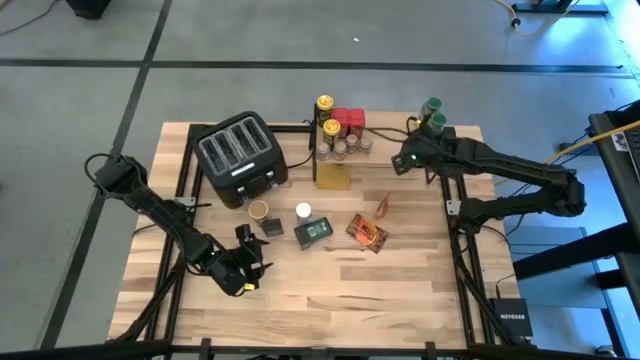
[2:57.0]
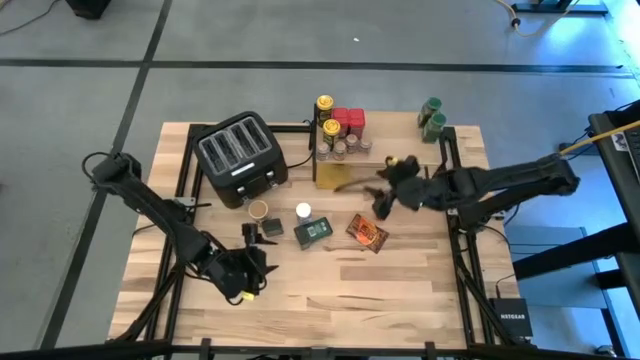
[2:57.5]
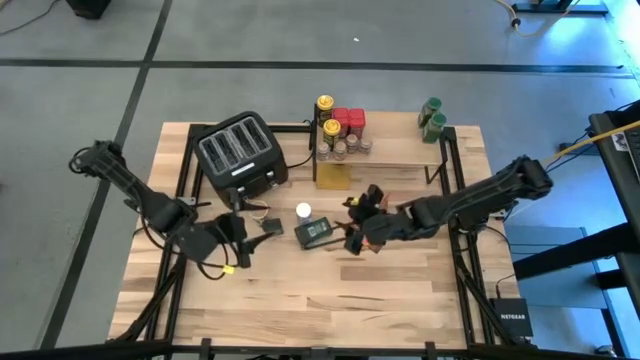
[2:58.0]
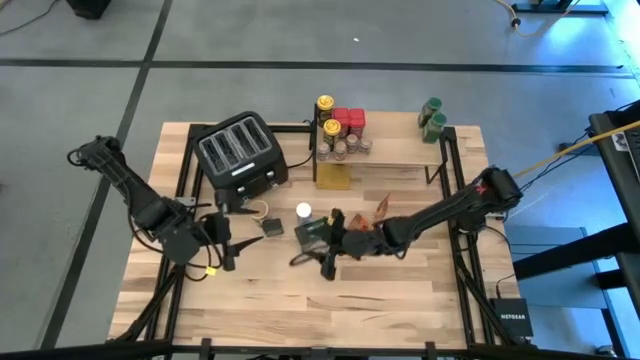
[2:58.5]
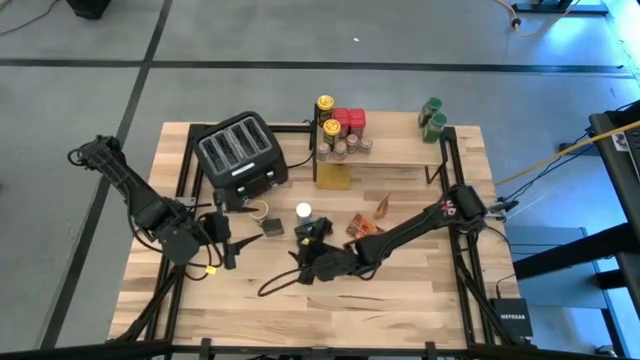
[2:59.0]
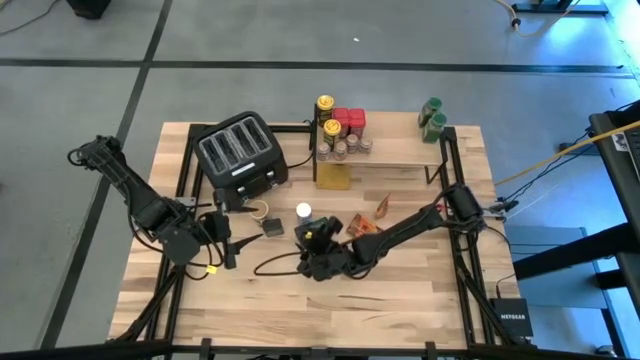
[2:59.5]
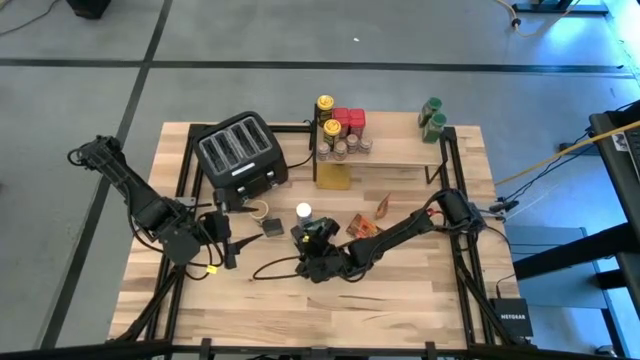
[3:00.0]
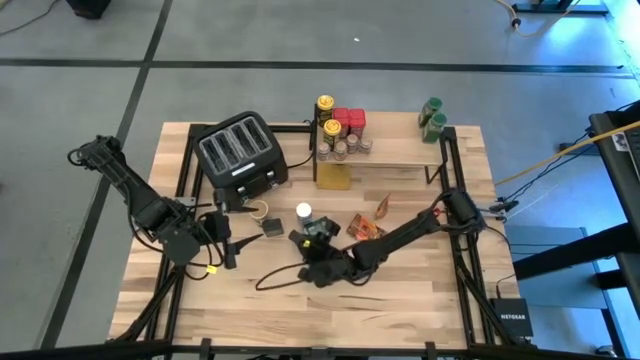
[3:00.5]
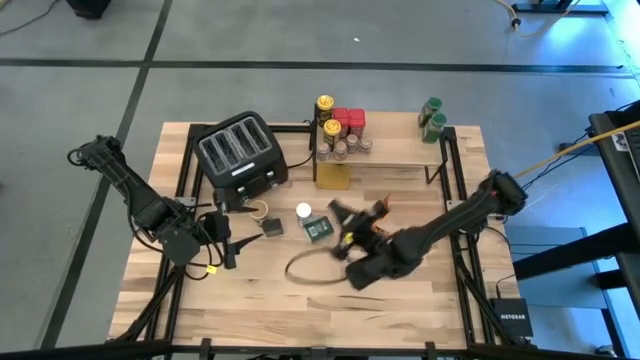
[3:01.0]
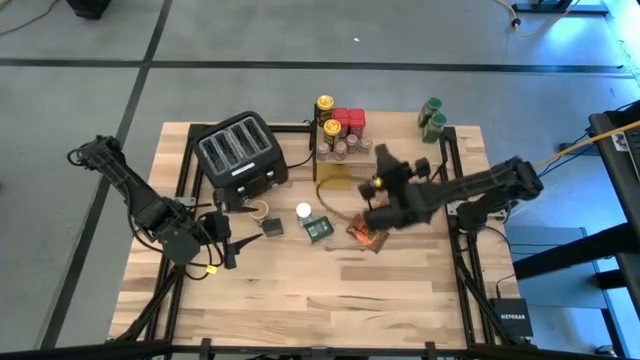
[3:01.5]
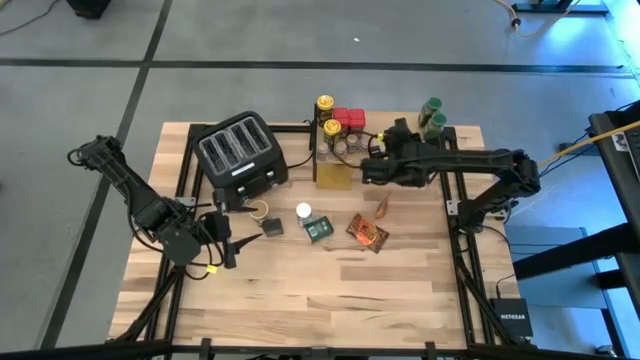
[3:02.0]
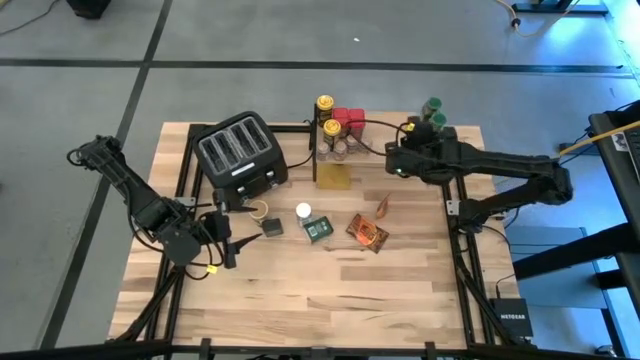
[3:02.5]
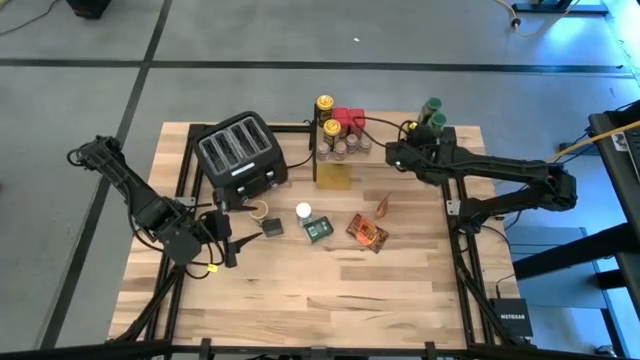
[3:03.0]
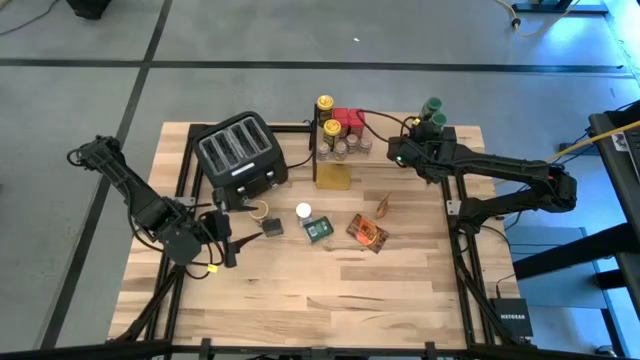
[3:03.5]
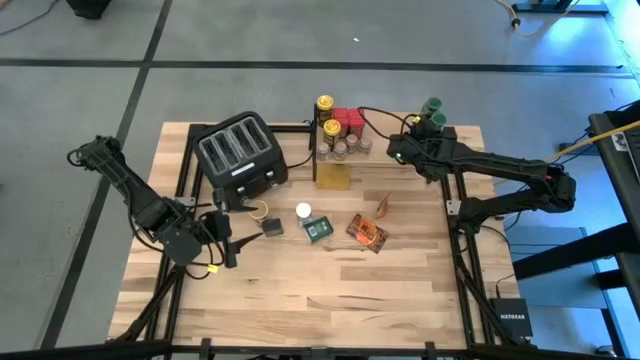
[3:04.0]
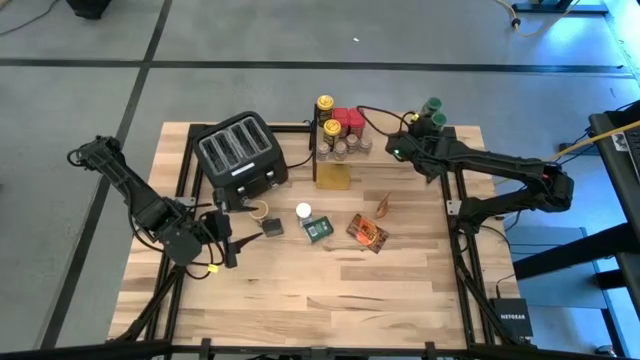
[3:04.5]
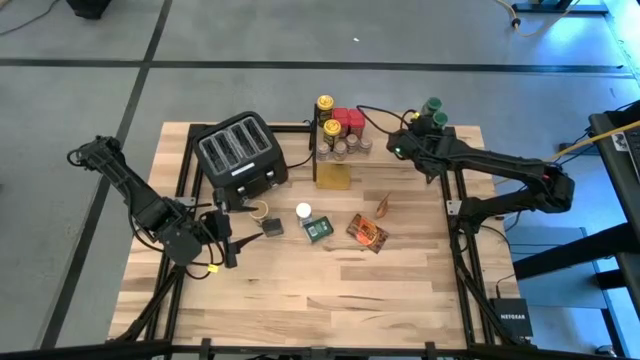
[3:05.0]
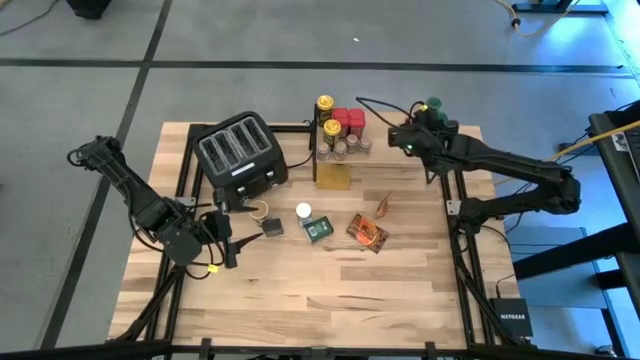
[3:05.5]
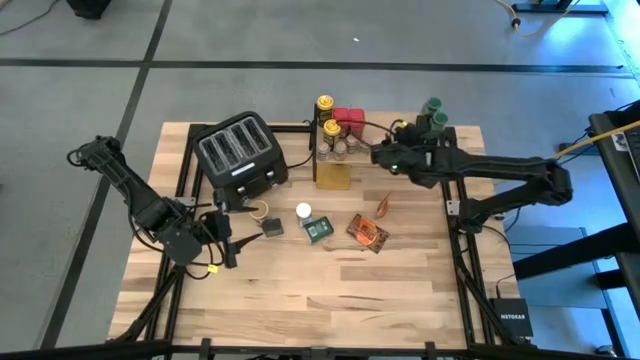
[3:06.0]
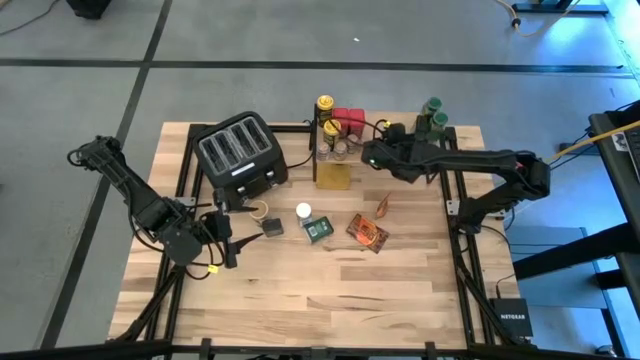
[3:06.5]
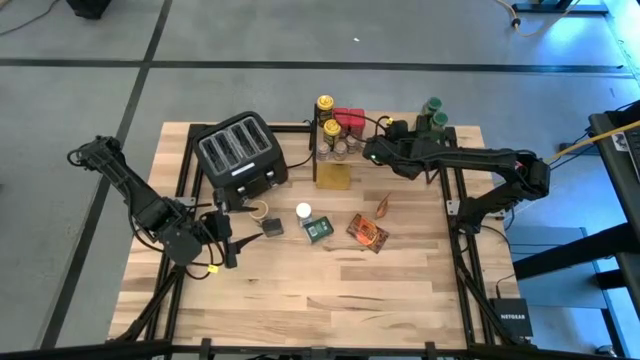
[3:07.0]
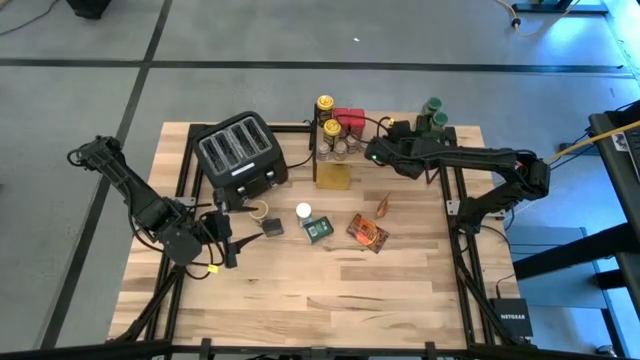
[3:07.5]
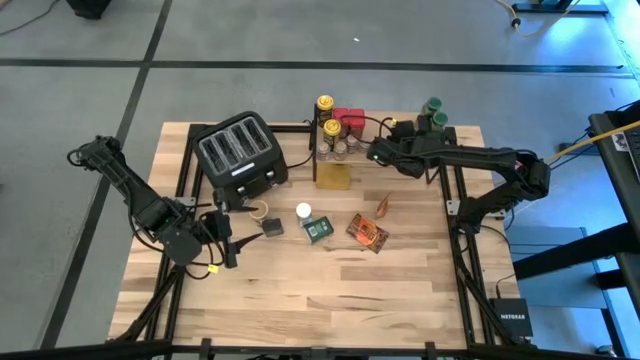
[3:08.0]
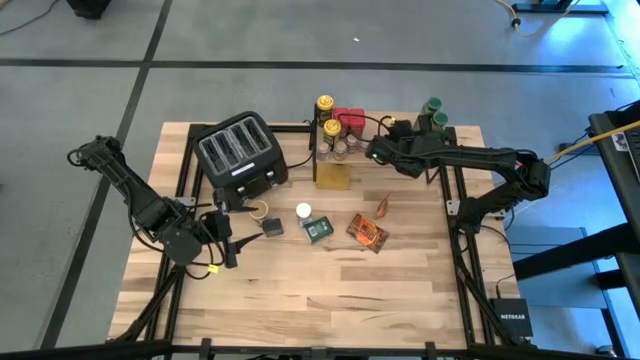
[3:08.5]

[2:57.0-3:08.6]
Task: Shelf spices
Put the black seasoning can on the shelf

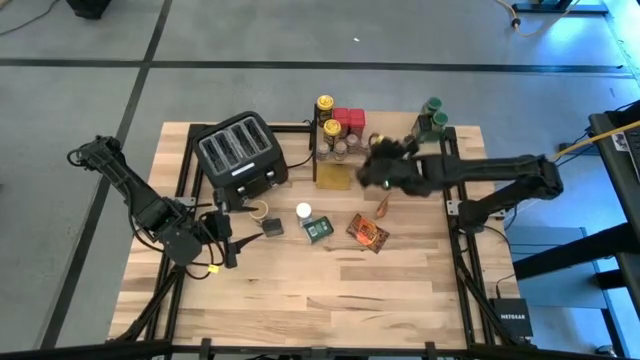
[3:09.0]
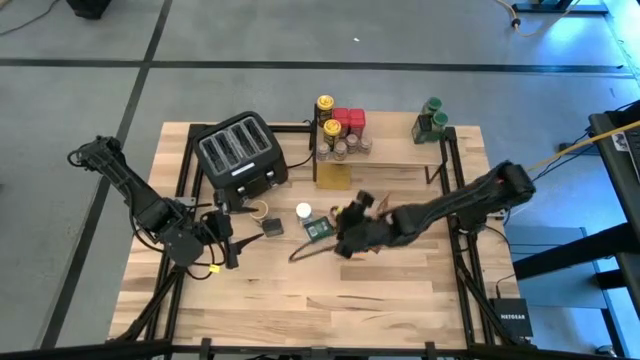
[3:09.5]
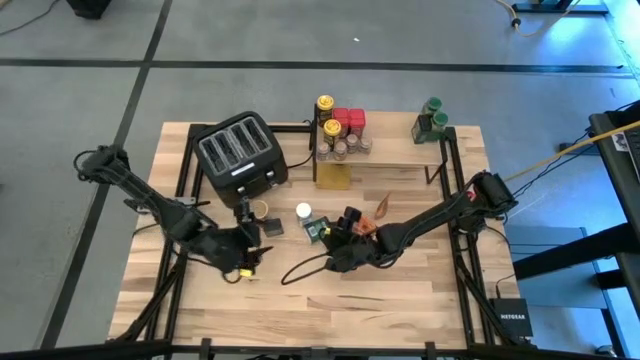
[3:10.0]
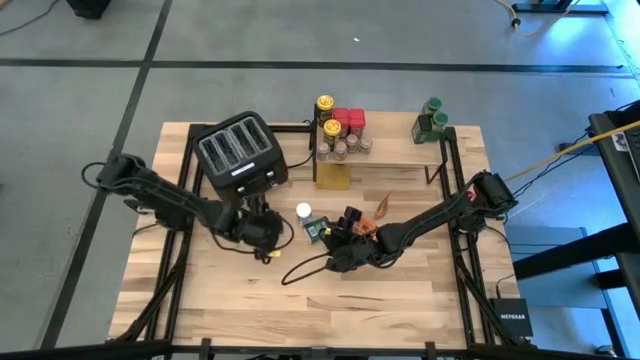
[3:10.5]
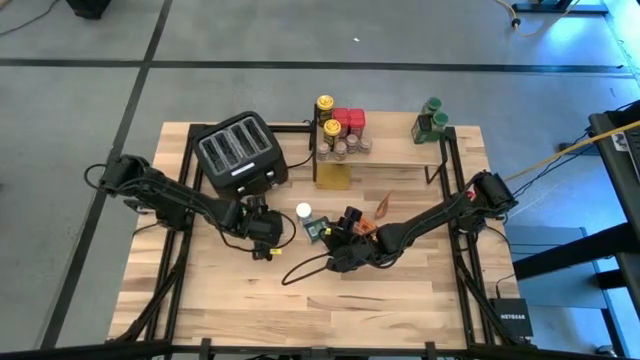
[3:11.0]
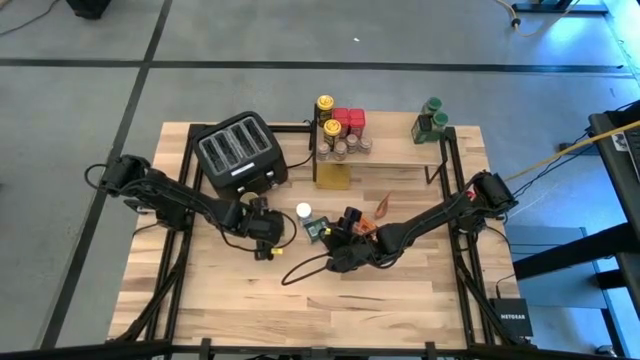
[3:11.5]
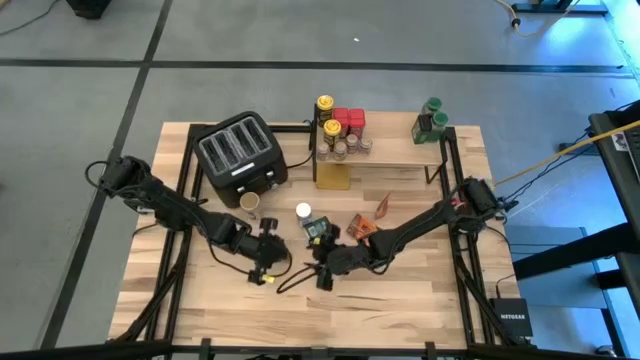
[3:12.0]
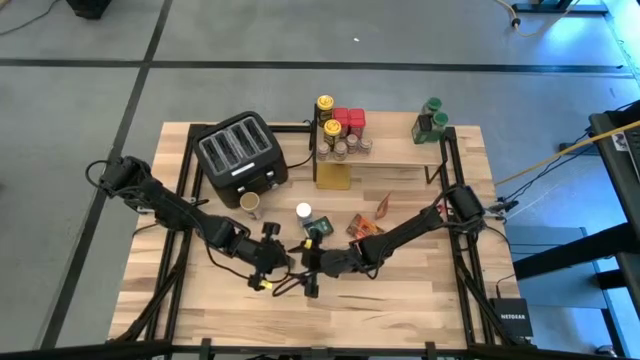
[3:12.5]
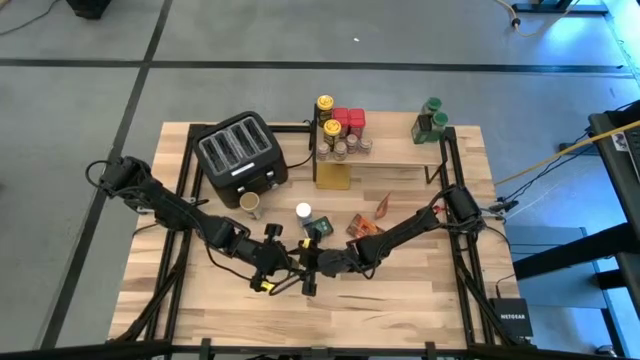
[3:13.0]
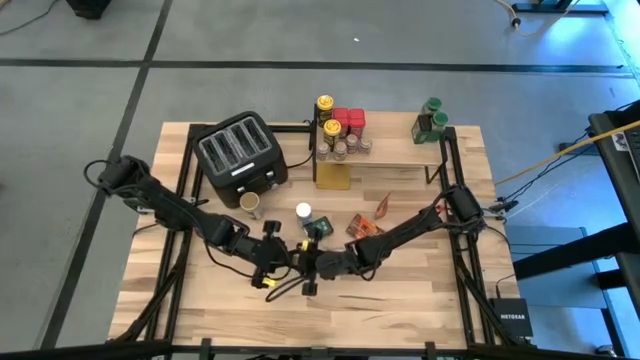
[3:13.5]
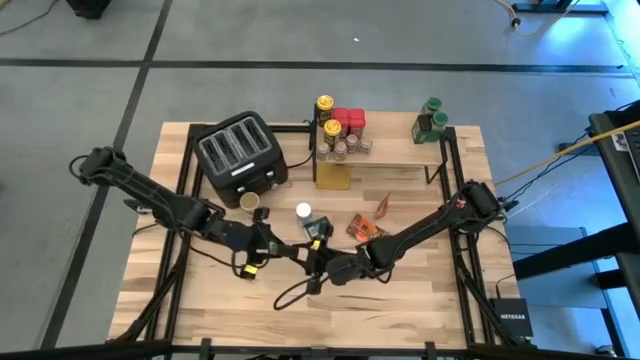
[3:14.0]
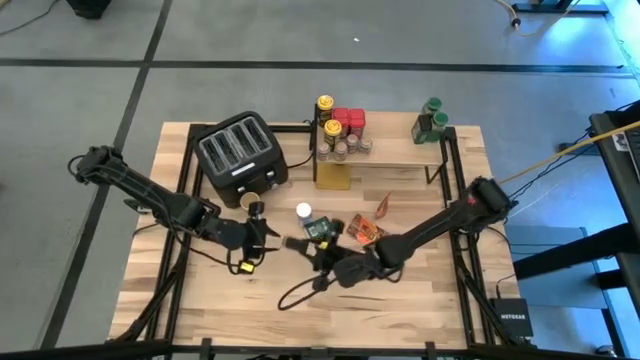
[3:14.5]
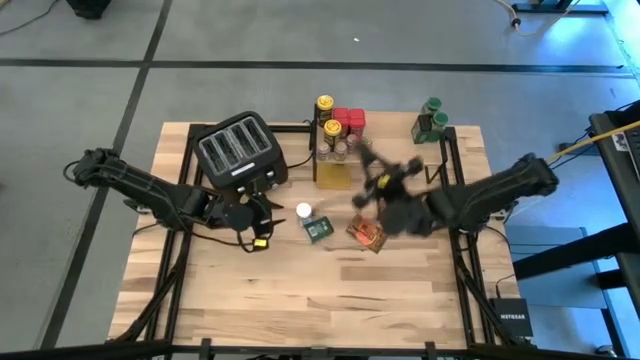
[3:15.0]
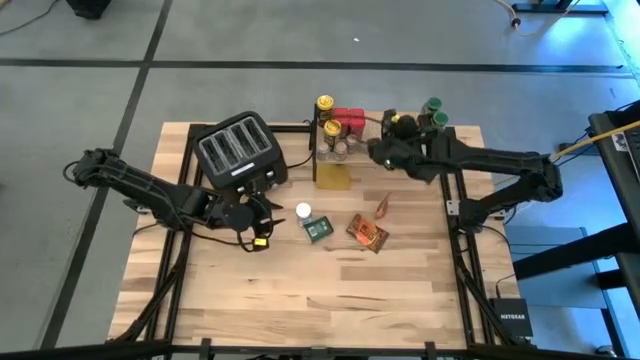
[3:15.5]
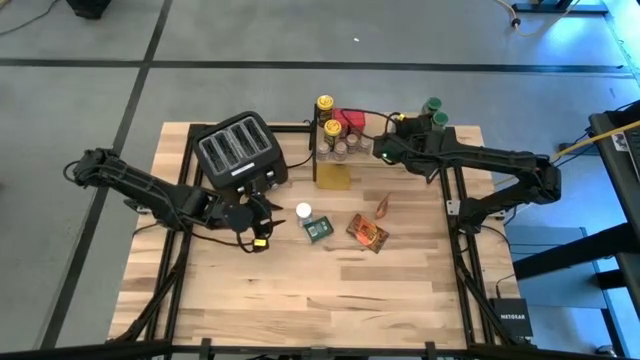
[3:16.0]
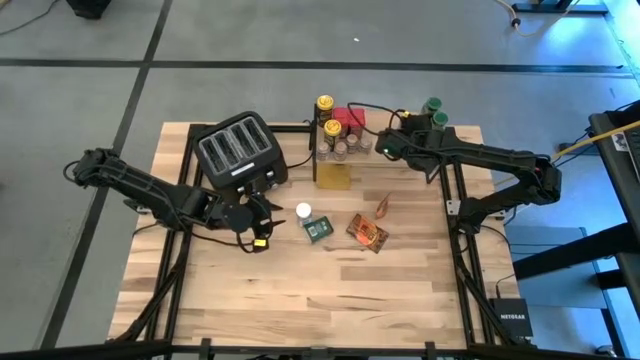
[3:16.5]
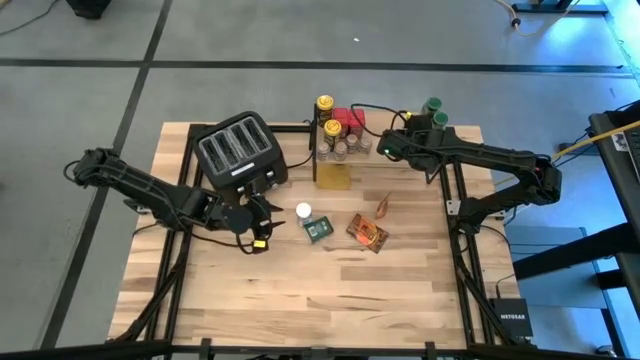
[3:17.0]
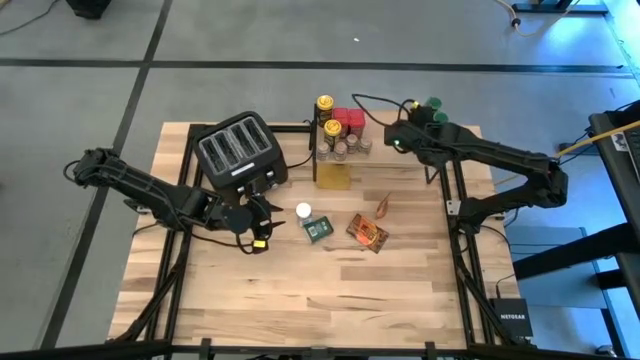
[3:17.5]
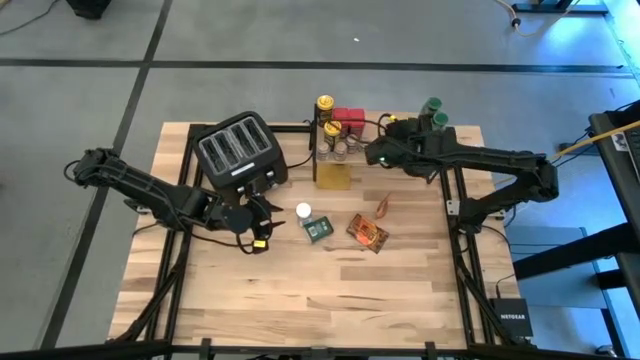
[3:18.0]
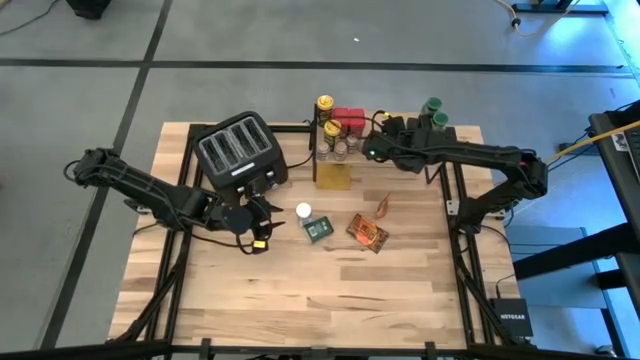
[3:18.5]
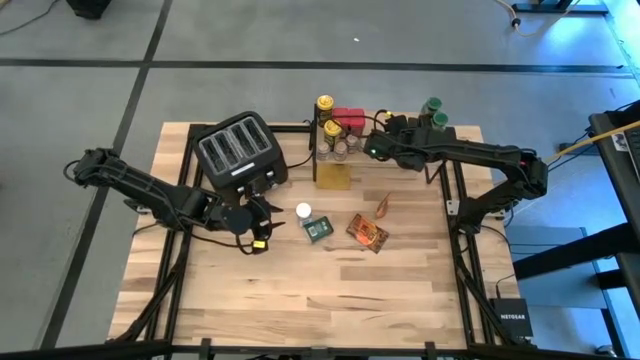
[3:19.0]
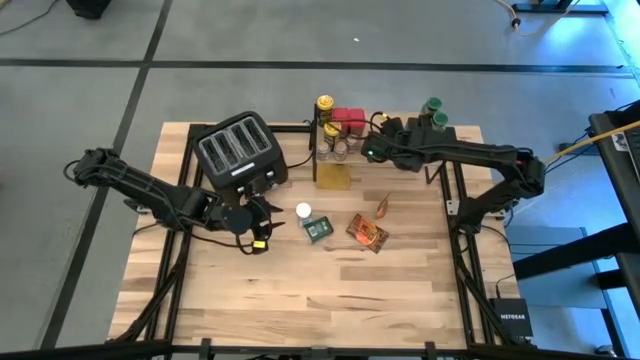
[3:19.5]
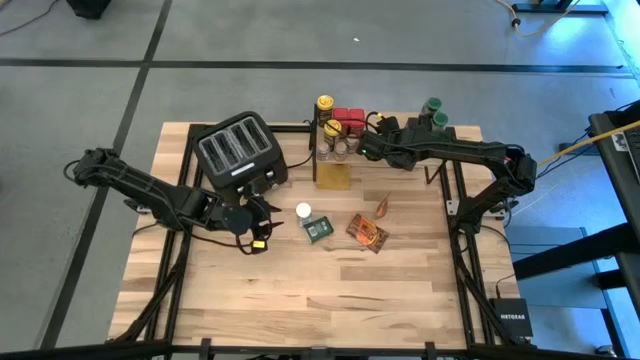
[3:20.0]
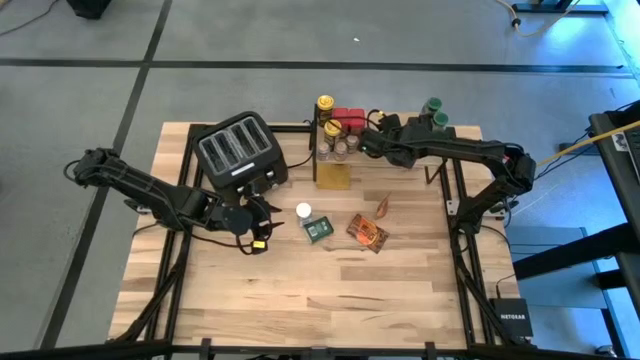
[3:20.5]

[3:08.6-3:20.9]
Put the black seasoning can on the shelf
